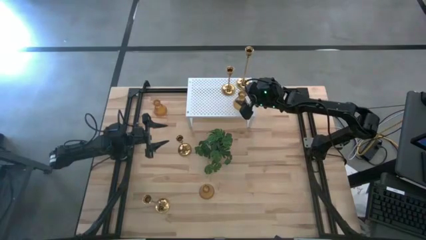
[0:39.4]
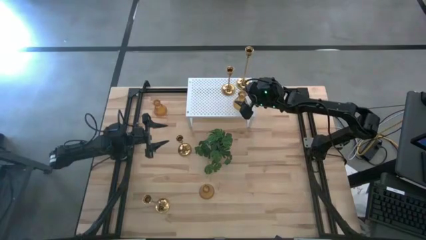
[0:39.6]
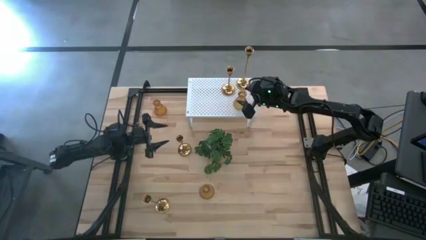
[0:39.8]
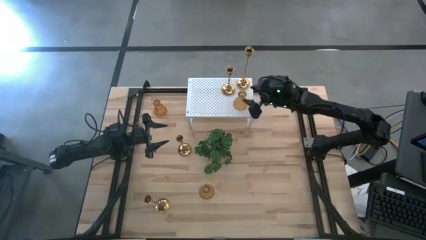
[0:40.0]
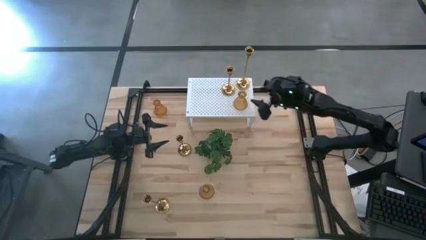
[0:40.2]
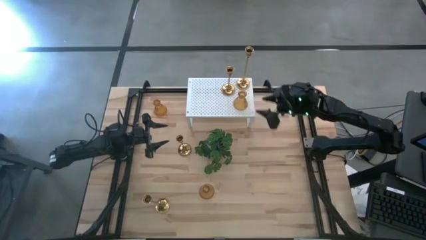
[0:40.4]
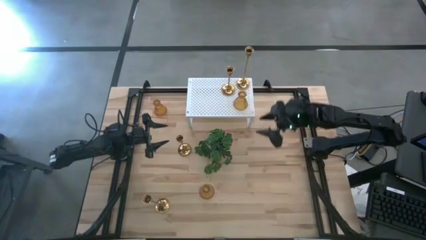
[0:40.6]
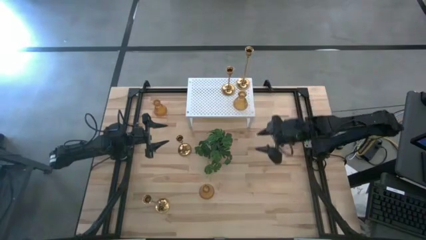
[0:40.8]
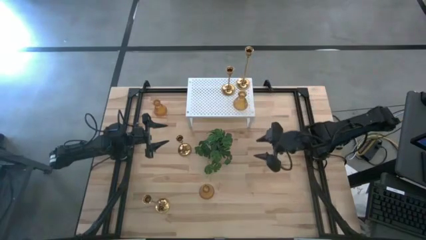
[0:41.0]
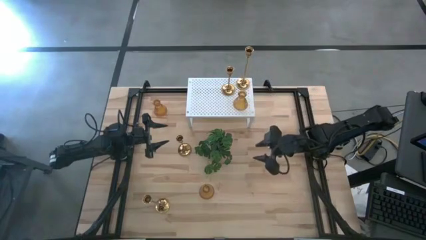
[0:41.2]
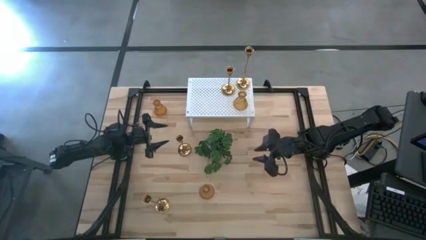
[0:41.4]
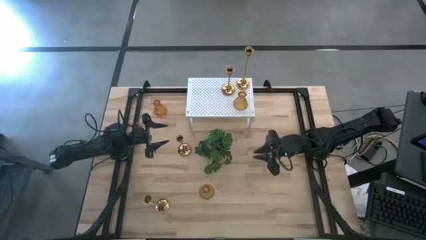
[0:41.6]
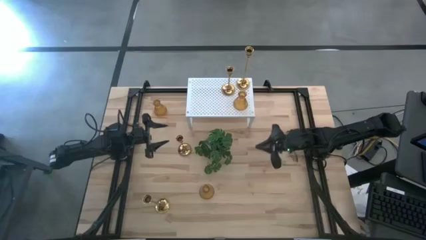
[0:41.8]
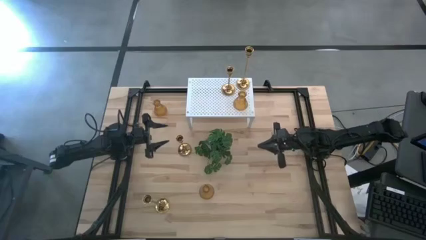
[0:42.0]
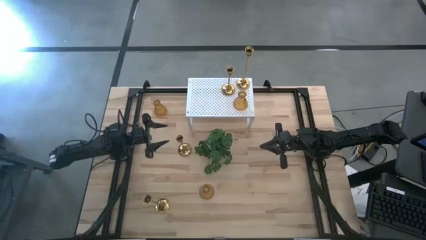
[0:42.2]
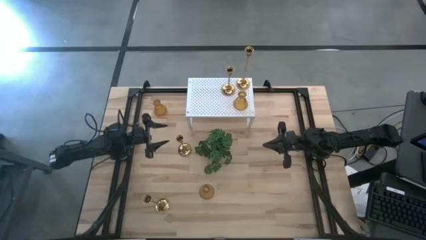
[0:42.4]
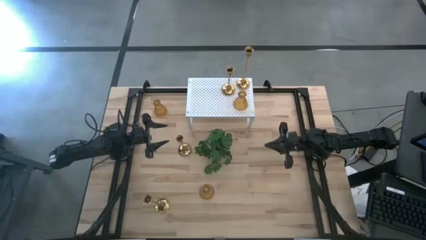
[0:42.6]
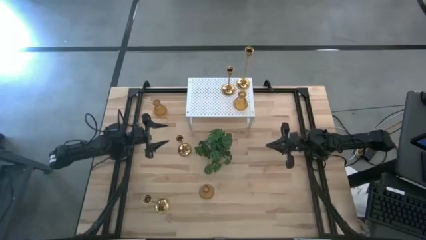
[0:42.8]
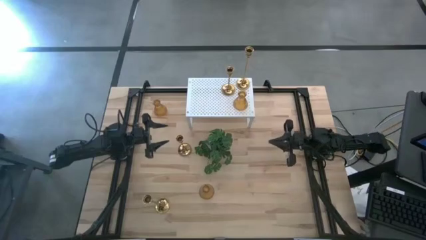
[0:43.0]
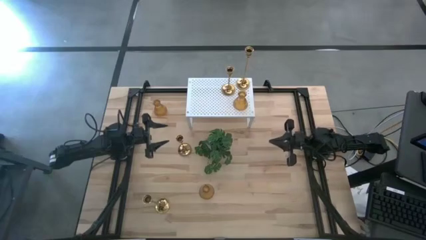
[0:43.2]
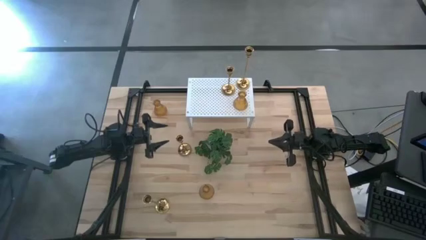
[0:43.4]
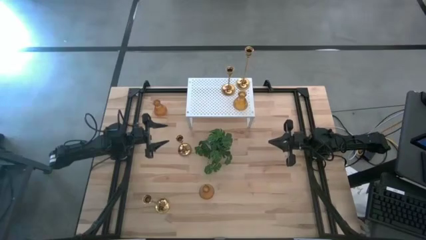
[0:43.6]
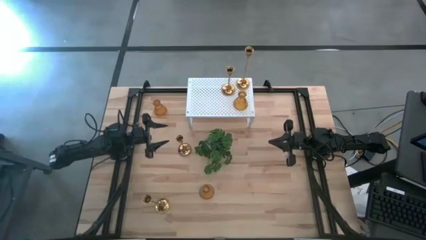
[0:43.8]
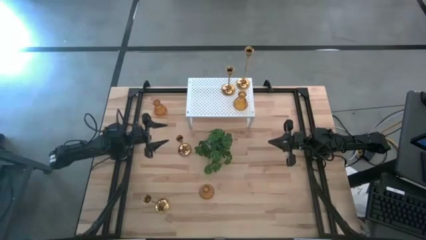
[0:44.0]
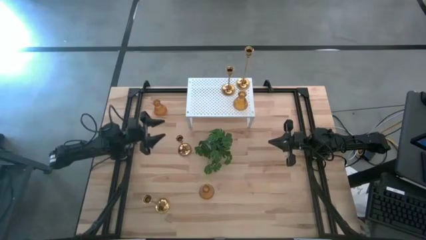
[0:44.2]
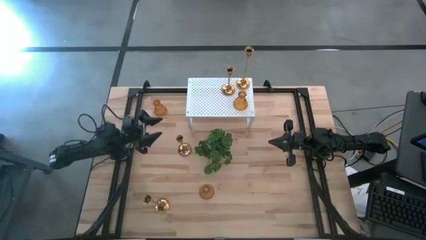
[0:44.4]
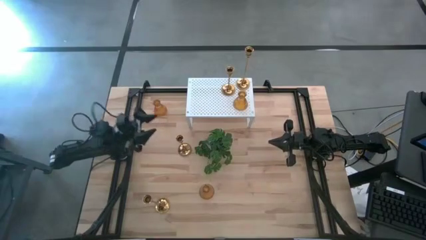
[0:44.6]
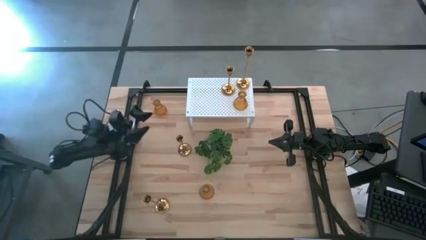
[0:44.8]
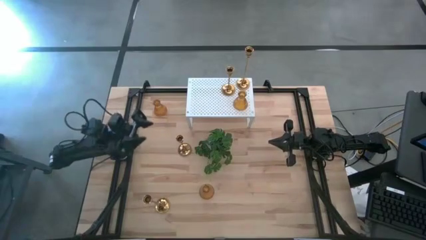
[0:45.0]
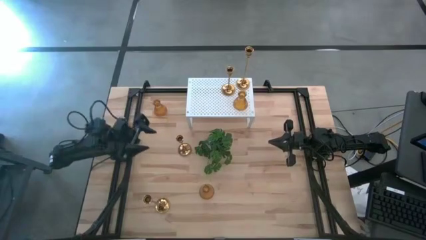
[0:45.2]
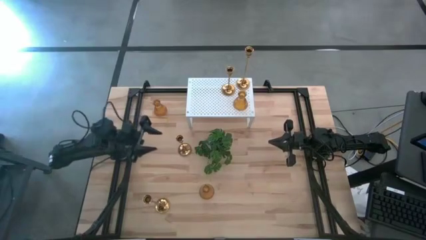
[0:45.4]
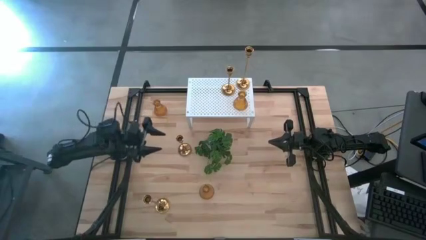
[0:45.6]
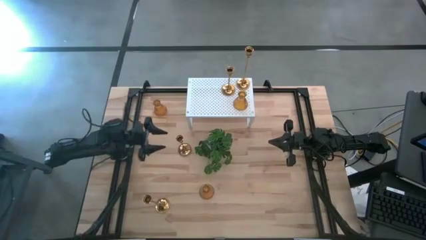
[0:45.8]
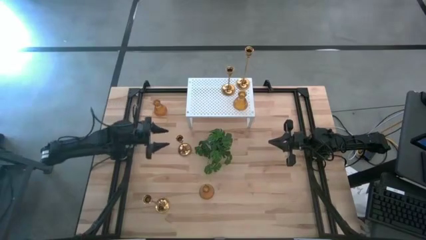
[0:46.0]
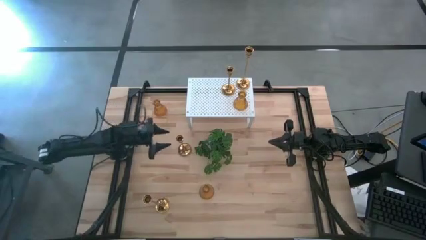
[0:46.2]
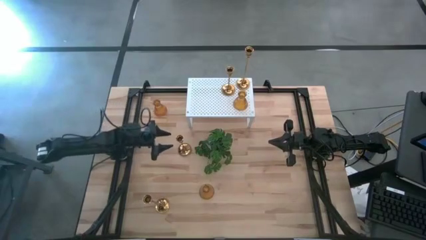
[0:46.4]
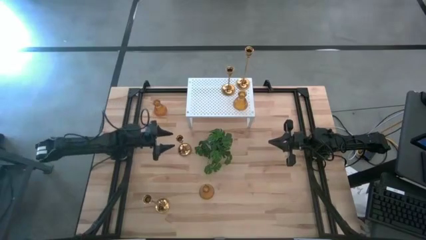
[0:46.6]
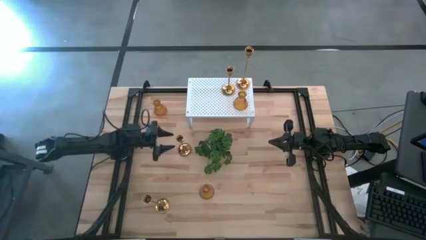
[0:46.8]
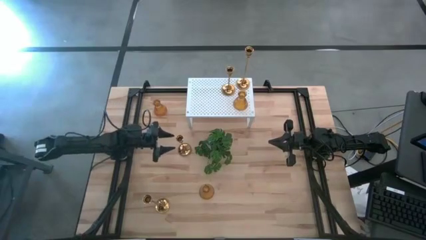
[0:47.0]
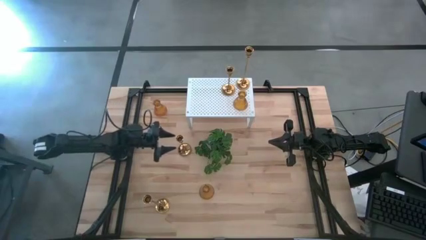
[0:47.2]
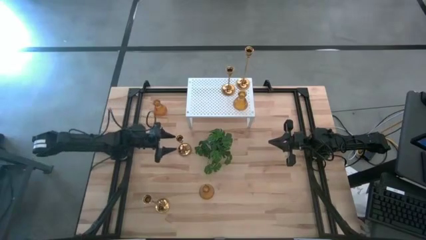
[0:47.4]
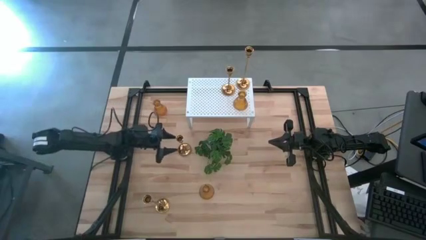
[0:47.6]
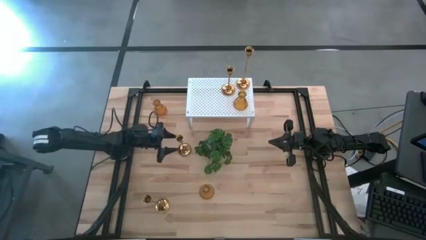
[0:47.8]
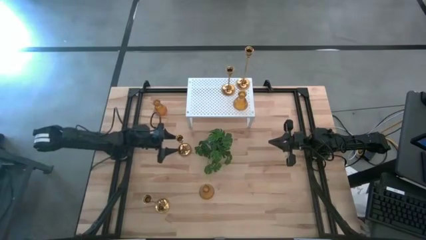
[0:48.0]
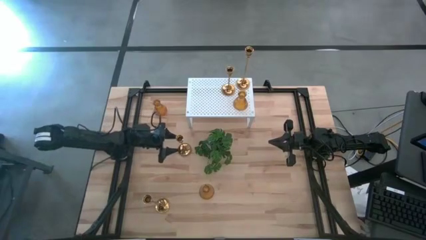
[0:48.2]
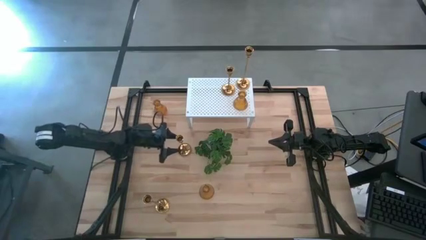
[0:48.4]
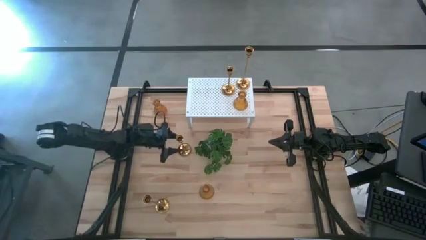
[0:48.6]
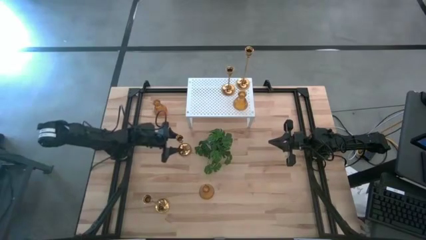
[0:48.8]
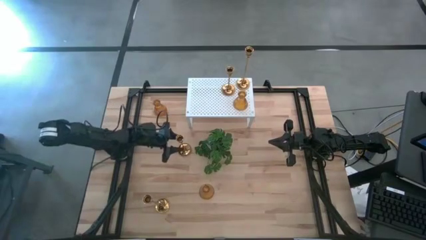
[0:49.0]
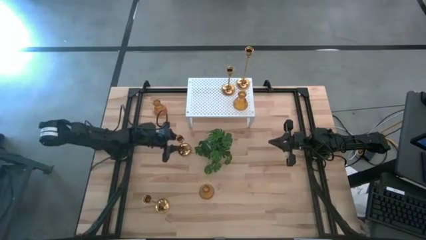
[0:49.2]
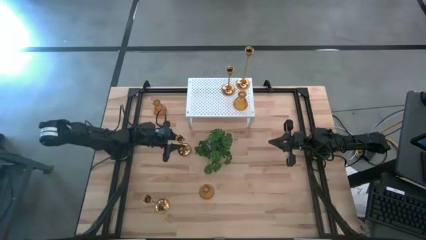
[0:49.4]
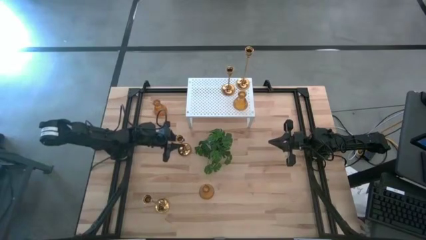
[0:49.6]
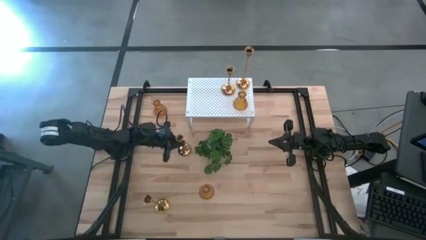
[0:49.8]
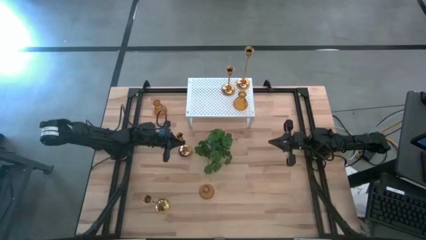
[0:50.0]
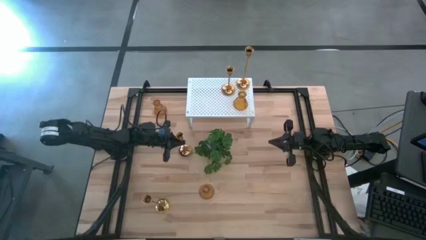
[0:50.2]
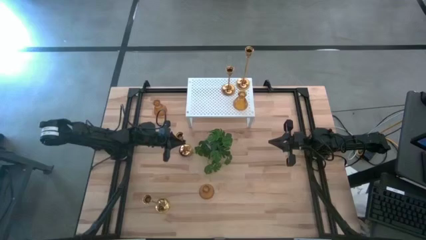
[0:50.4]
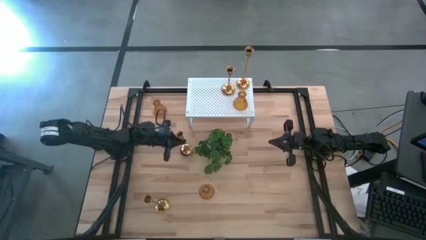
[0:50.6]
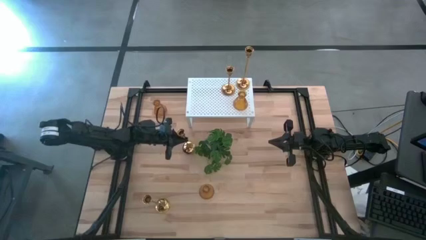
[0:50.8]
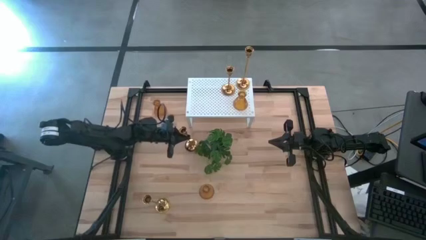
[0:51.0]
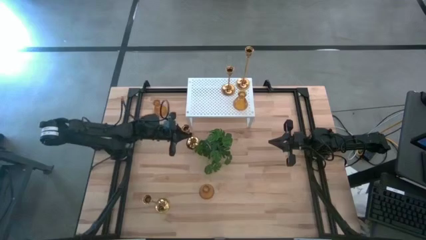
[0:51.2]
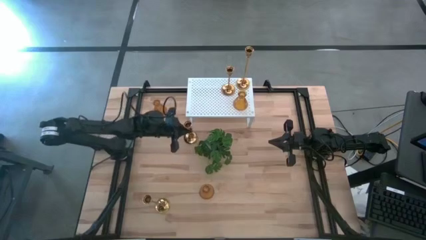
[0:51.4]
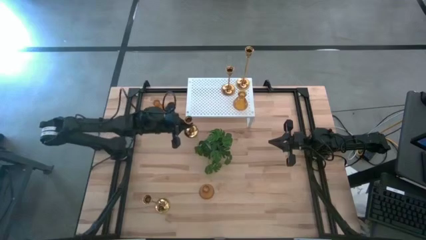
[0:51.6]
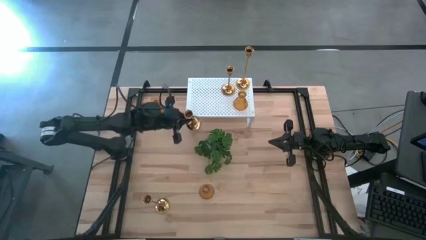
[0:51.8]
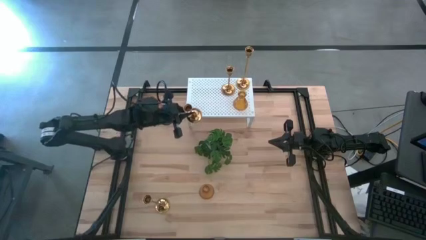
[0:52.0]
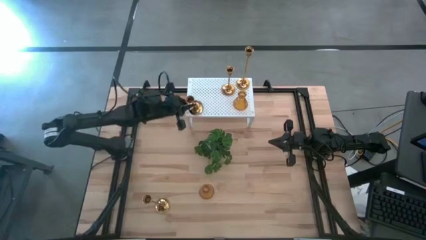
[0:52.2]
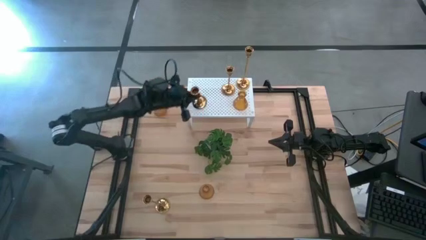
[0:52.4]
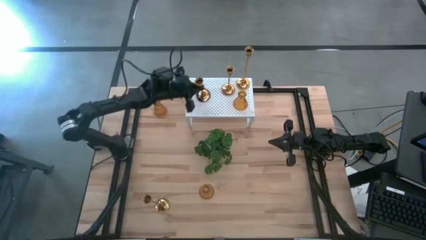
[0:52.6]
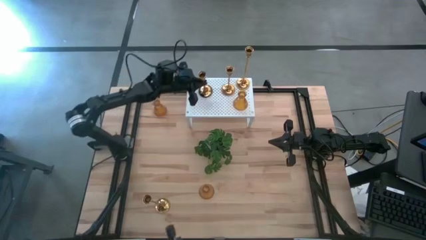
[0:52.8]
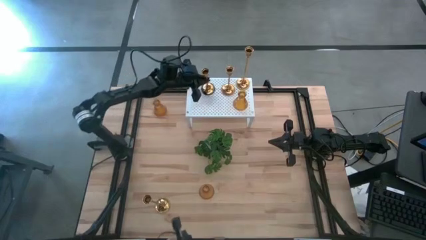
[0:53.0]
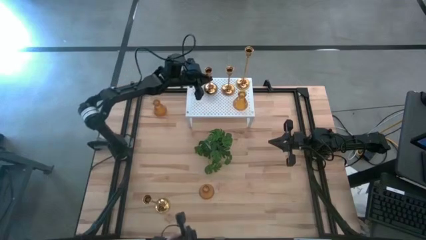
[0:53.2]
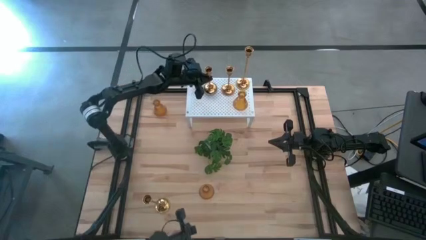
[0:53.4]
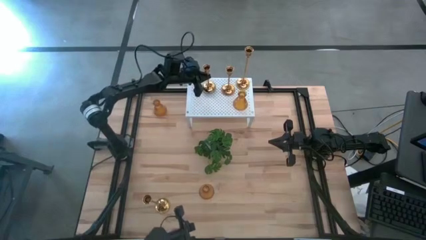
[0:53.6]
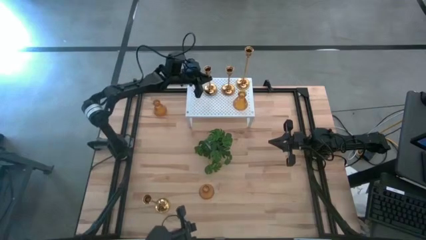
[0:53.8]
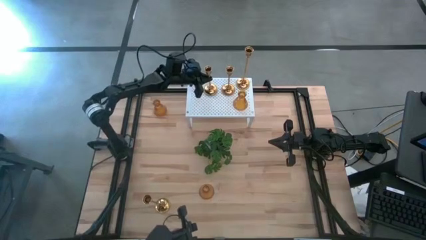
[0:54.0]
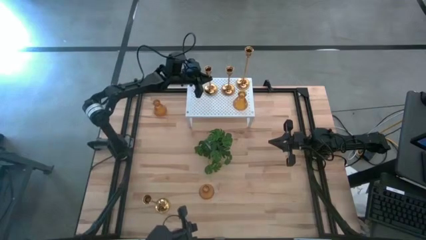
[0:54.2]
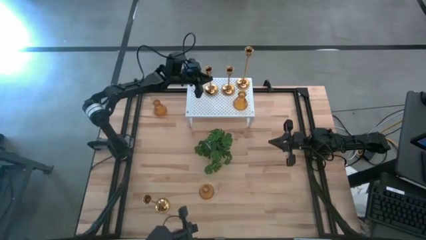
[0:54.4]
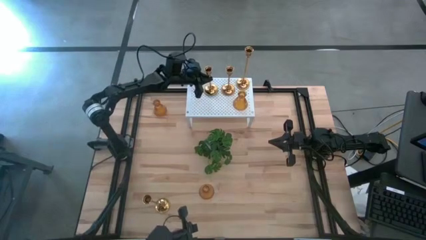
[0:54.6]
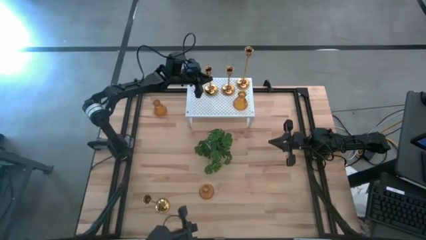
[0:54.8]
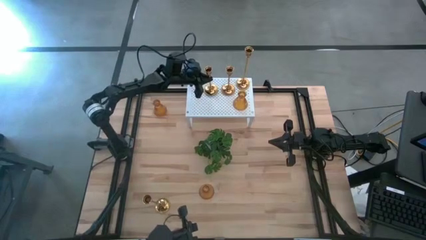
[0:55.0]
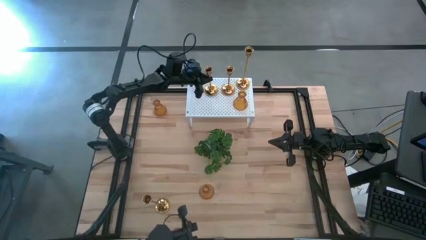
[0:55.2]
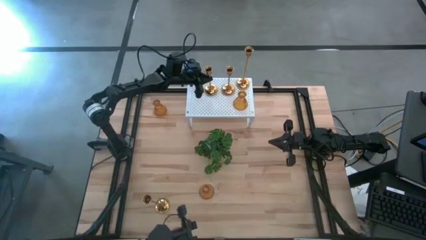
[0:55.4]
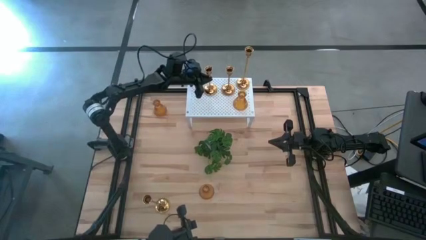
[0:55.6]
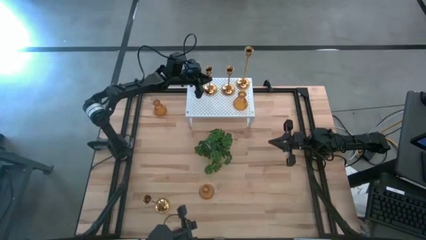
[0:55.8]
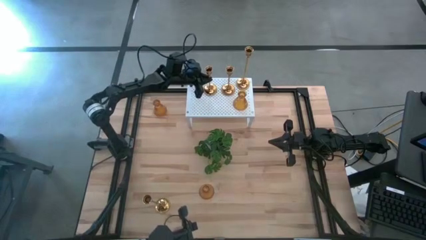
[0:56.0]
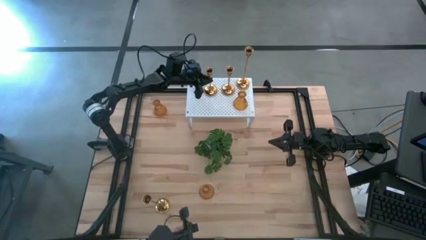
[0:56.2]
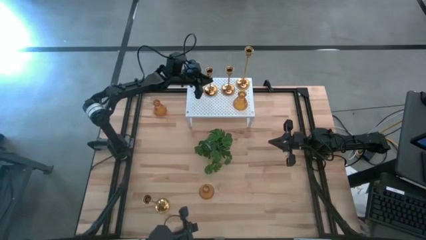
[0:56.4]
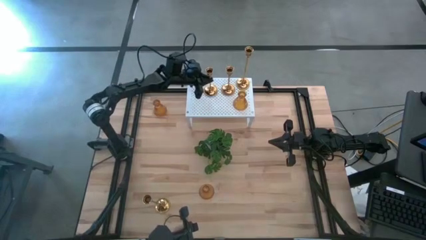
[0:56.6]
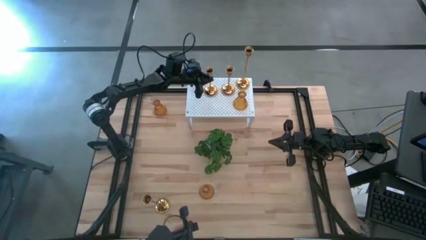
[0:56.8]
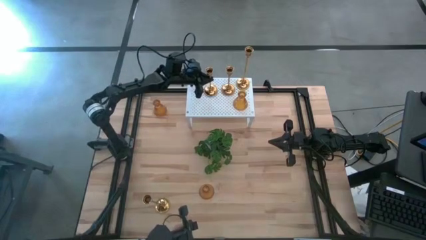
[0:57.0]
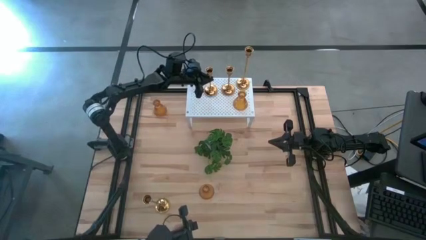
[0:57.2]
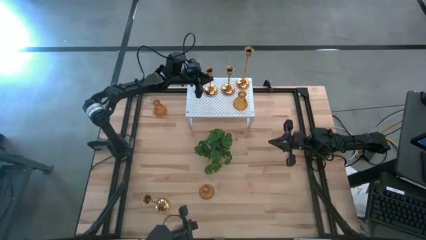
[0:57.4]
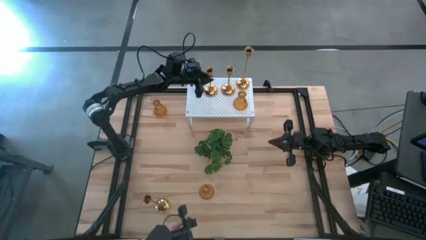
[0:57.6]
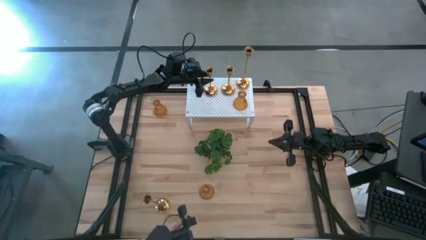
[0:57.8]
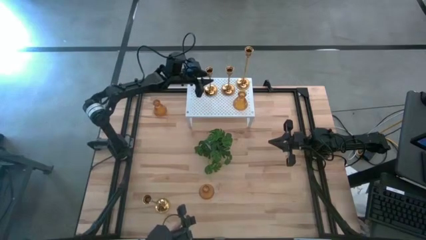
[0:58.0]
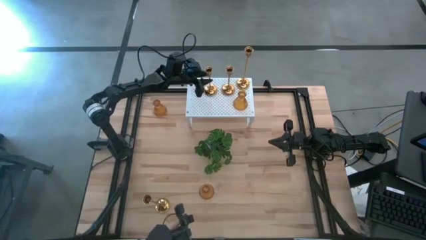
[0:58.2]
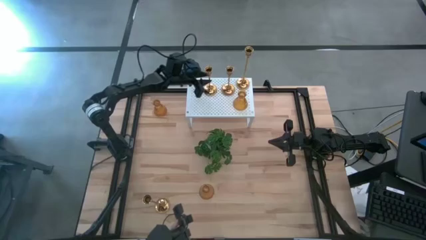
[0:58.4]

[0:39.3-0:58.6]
Task: Pick & Place candle stick holders
Align the small gold candle holder with the other small gold candle holder on the shelf
